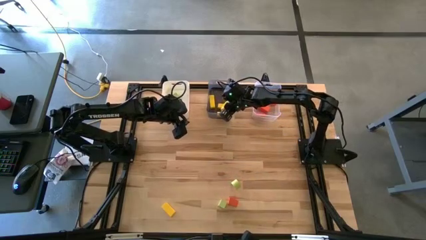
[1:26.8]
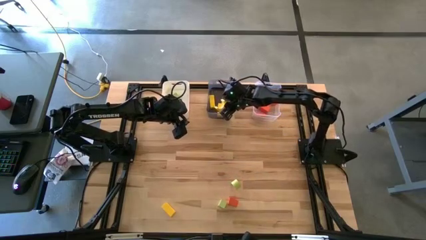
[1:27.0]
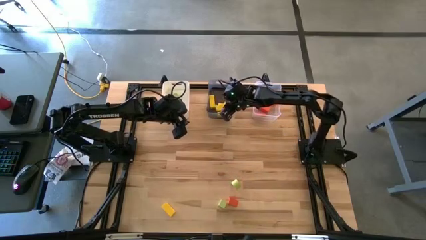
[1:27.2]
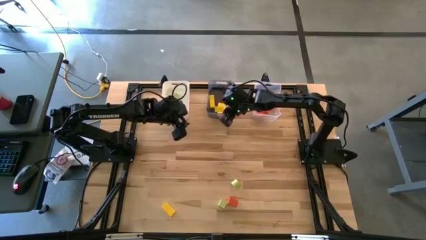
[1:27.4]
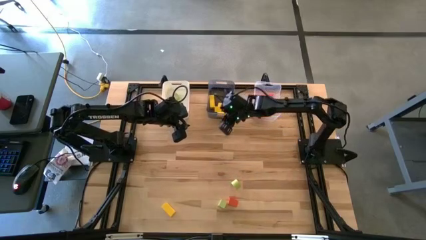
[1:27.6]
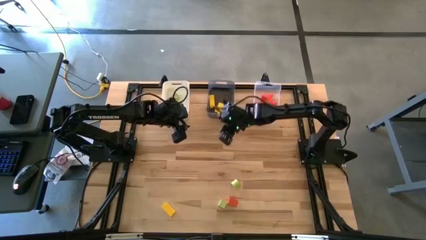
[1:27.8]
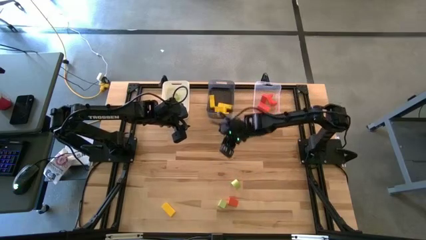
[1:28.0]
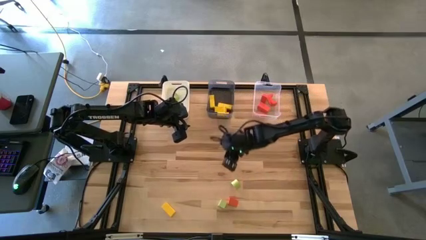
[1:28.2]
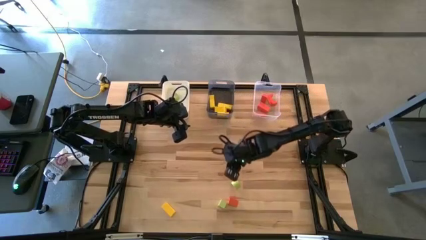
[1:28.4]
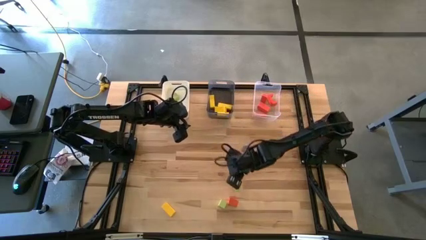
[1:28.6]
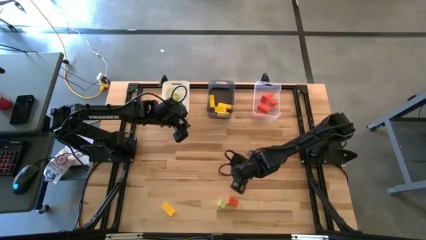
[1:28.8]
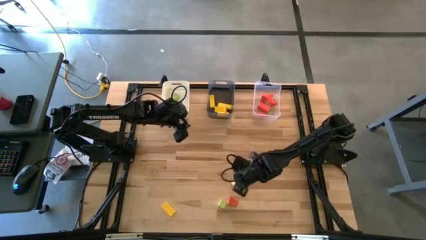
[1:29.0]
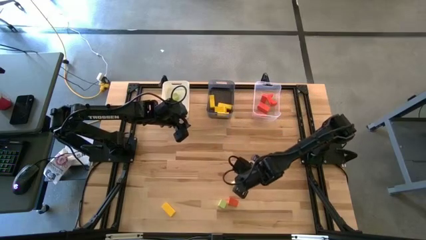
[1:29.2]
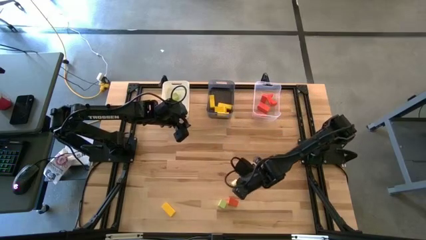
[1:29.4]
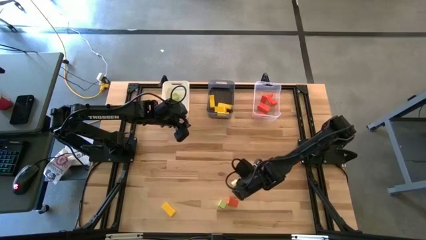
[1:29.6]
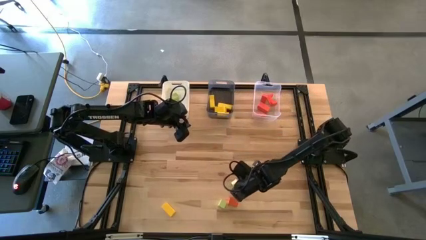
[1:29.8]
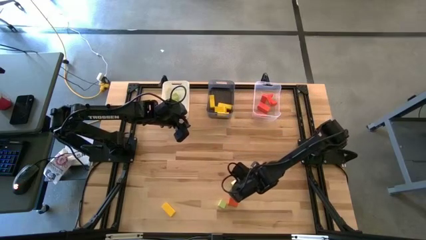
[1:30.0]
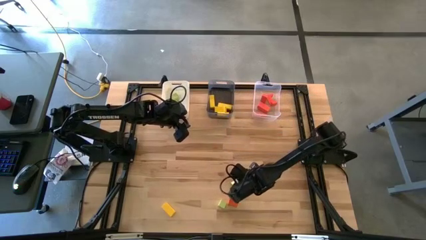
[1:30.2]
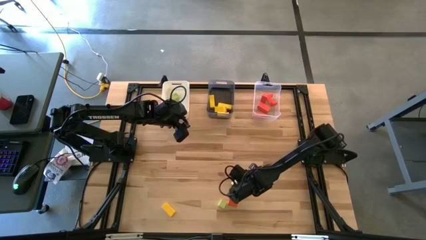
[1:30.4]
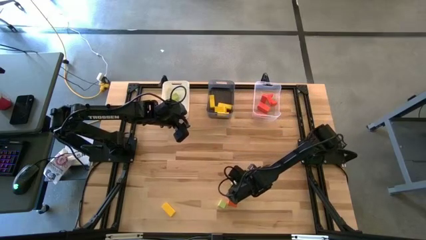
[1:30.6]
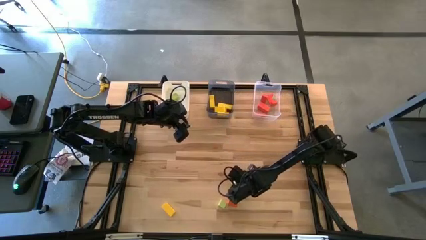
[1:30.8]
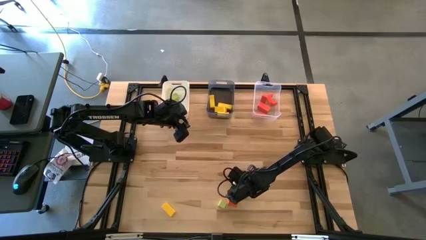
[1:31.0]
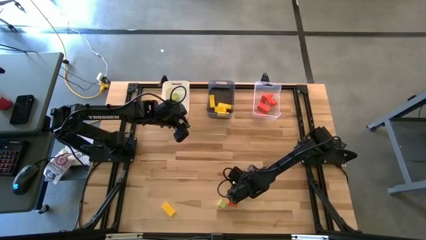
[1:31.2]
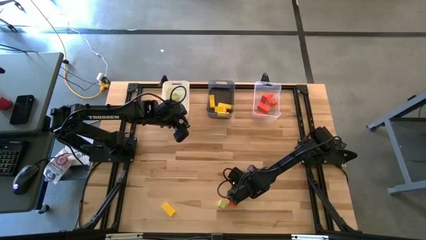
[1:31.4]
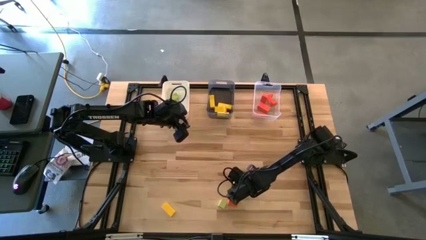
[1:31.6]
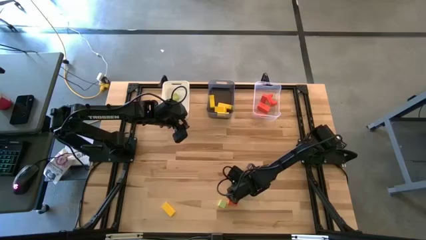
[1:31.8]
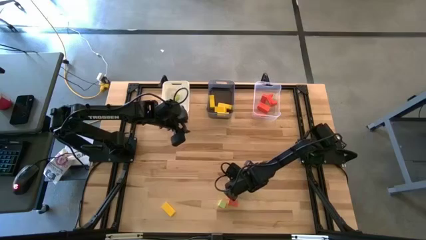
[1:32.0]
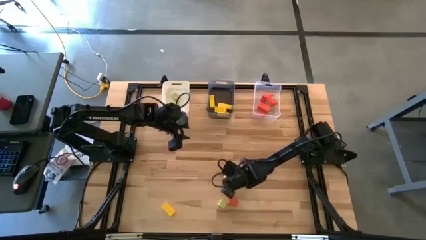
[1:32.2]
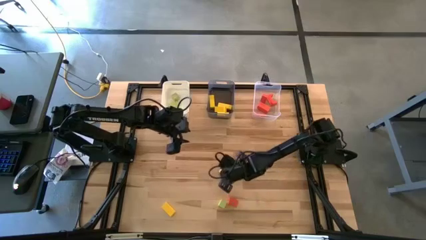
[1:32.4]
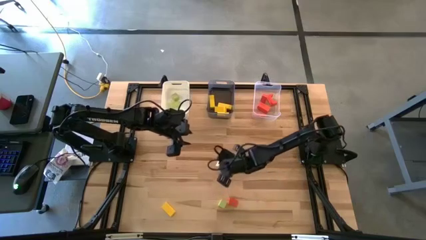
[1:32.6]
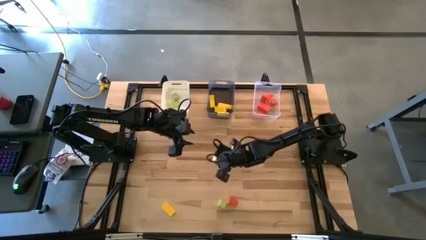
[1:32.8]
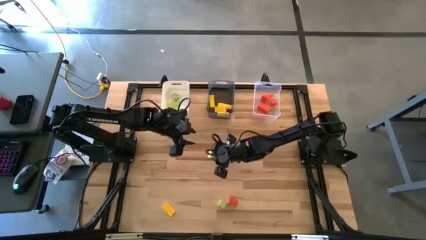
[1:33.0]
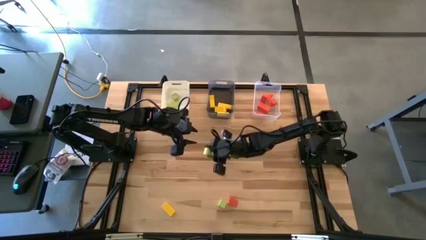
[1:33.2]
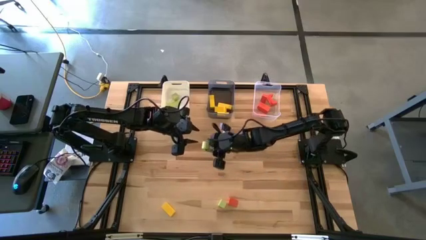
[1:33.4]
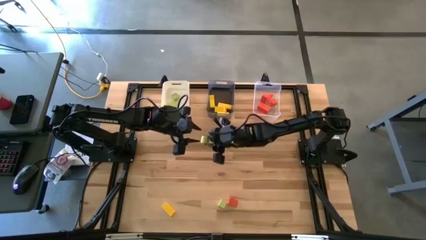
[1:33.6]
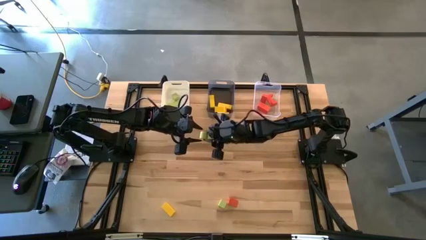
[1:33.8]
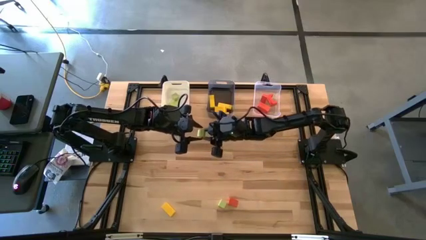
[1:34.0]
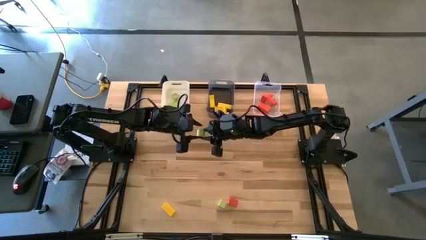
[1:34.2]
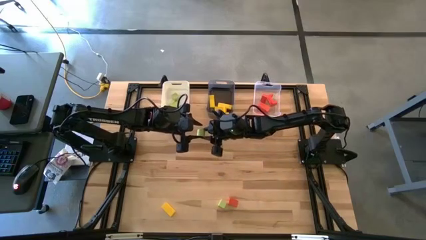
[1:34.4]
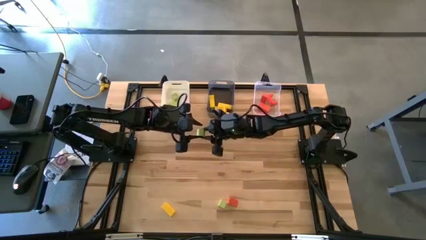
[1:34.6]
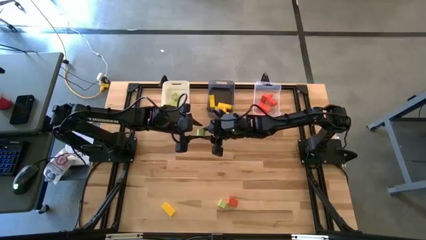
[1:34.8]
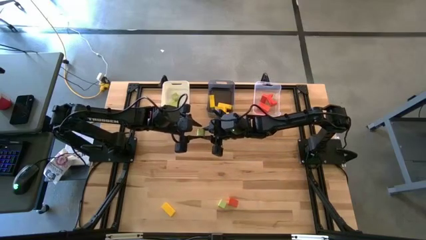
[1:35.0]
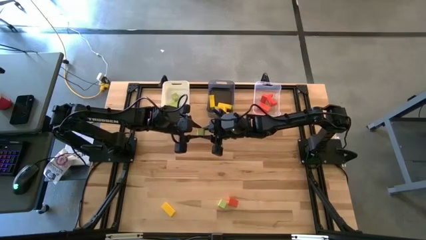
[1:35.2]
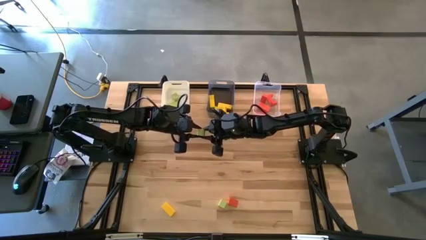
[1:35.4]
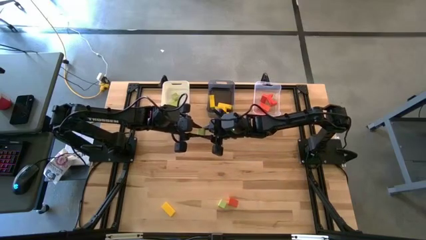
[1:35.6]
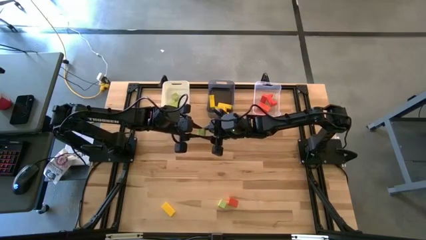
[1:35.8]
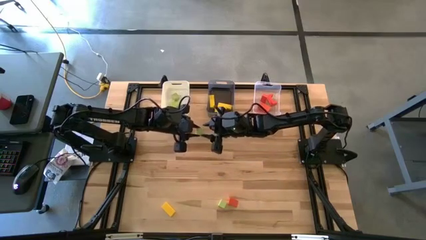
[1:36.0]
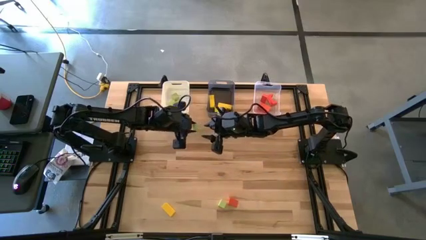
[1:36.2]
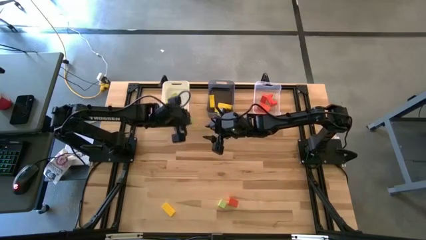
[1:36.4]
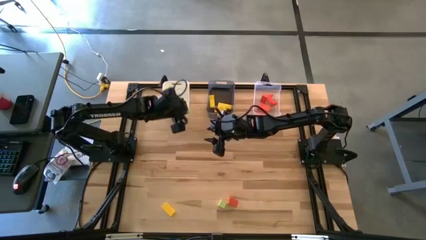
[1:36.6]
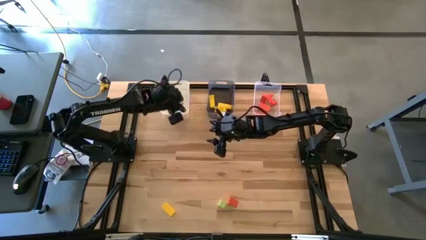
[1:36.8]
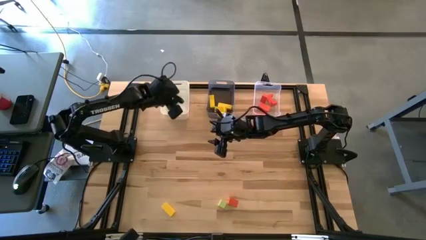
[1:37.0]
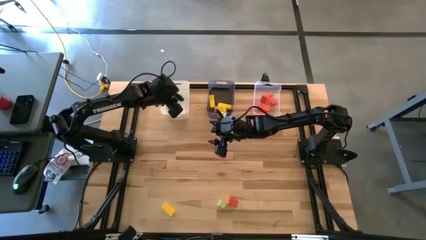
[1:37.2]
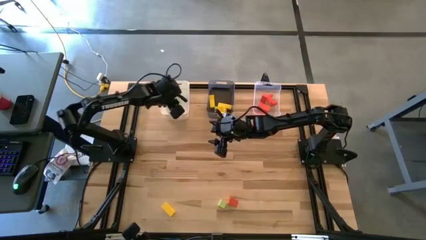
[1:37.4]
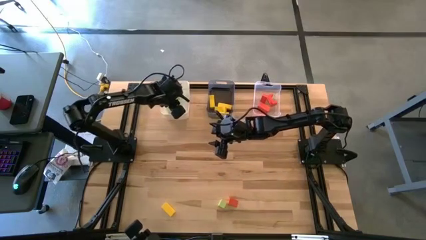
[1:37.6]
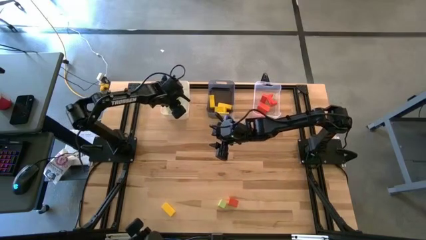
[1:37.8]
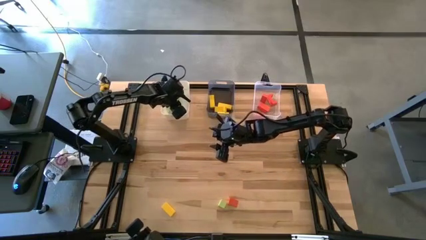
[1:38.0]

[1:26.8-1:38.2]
Task: Sort & place blocks by color
Put the green block into the white bin

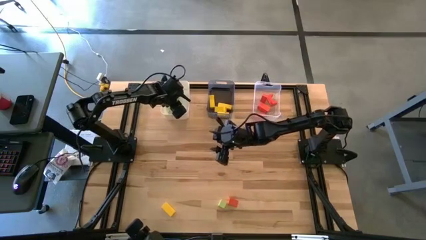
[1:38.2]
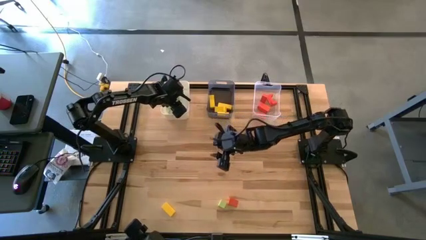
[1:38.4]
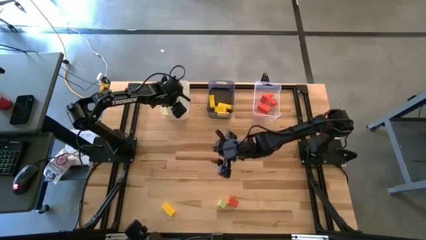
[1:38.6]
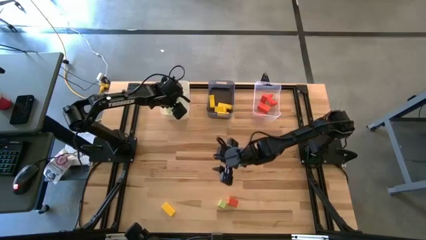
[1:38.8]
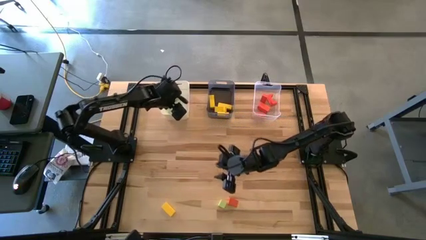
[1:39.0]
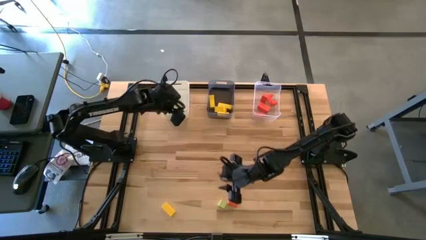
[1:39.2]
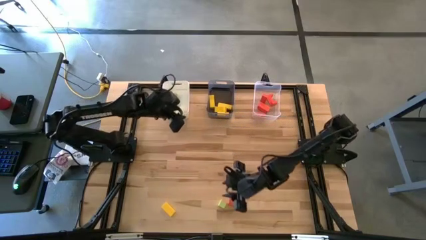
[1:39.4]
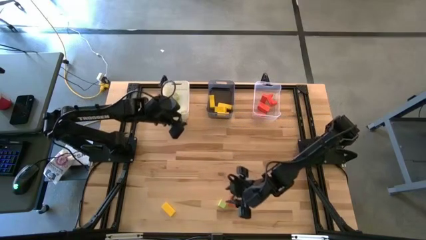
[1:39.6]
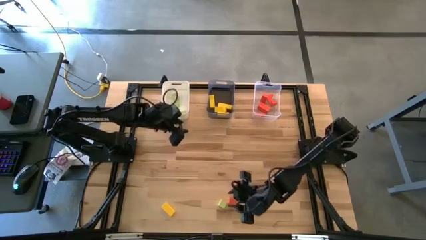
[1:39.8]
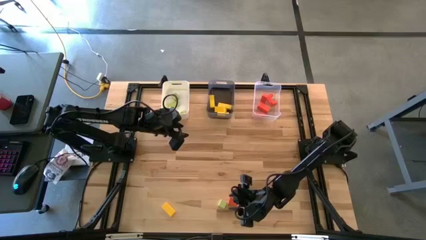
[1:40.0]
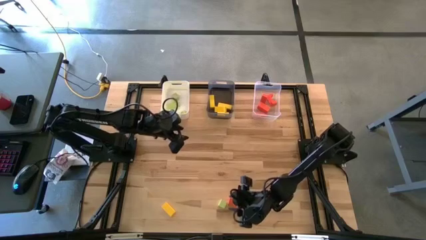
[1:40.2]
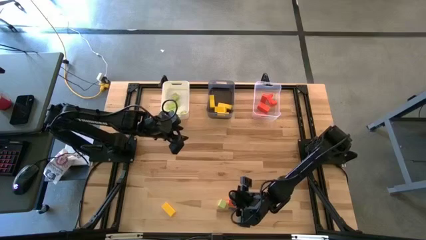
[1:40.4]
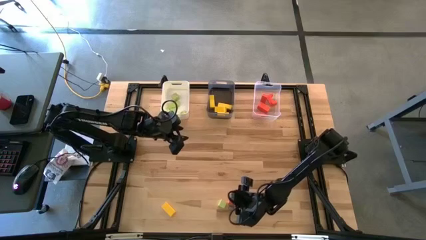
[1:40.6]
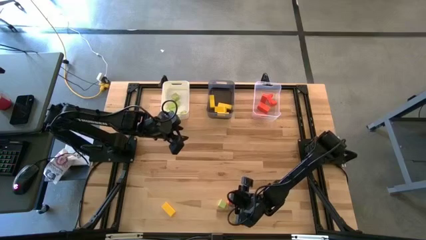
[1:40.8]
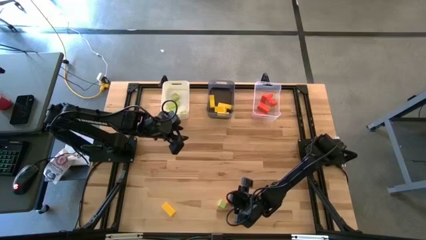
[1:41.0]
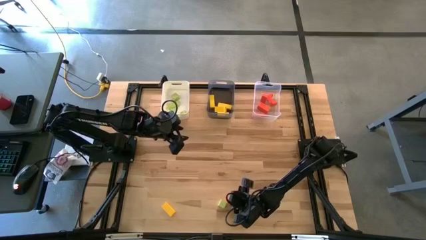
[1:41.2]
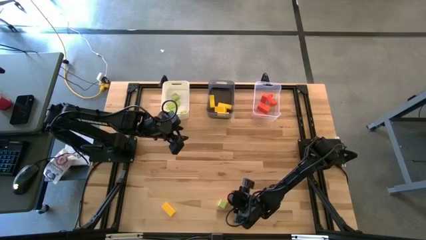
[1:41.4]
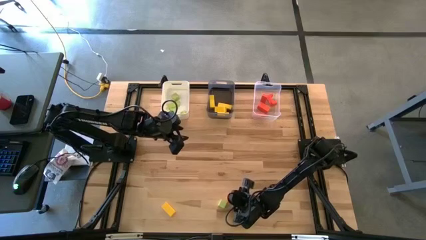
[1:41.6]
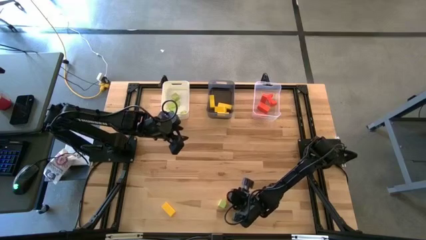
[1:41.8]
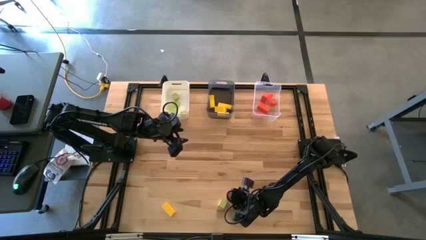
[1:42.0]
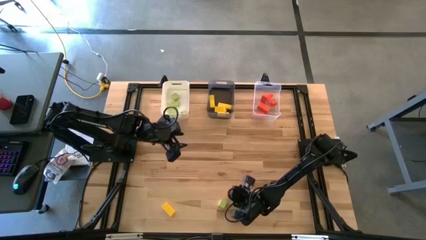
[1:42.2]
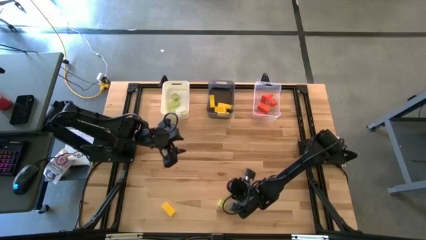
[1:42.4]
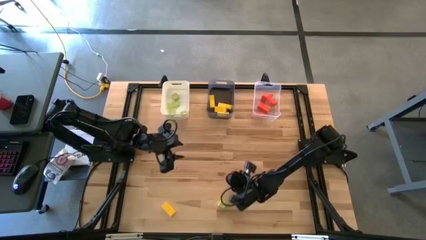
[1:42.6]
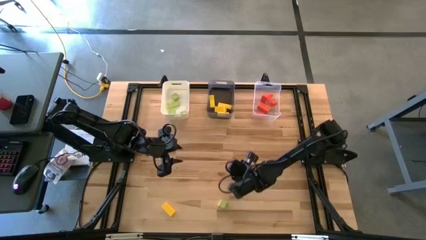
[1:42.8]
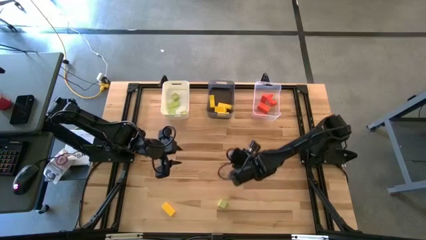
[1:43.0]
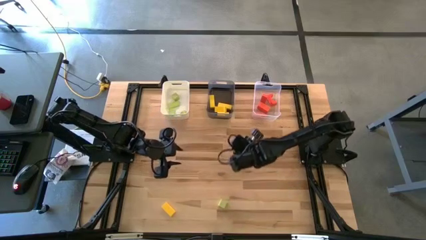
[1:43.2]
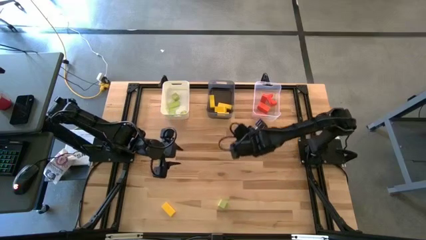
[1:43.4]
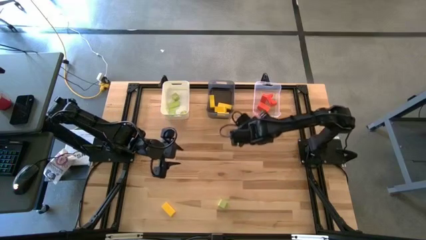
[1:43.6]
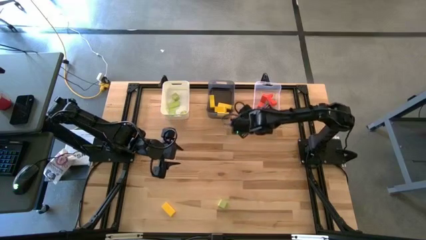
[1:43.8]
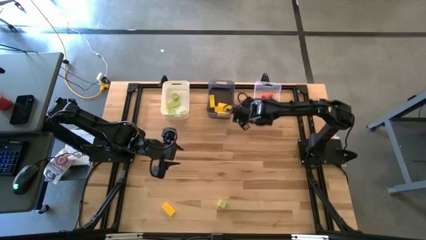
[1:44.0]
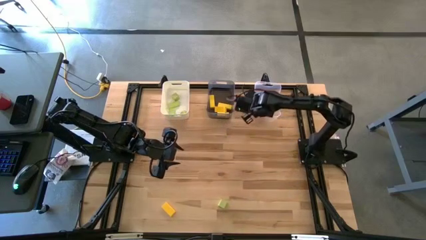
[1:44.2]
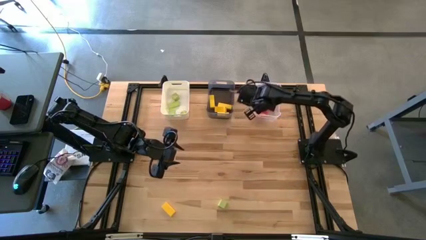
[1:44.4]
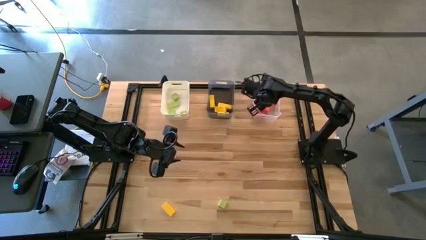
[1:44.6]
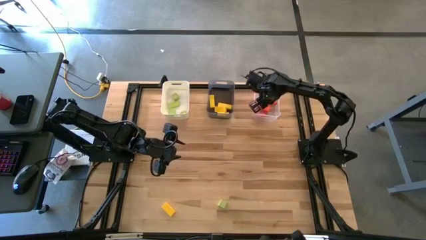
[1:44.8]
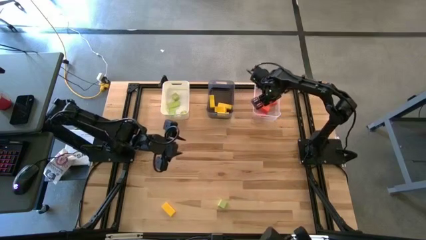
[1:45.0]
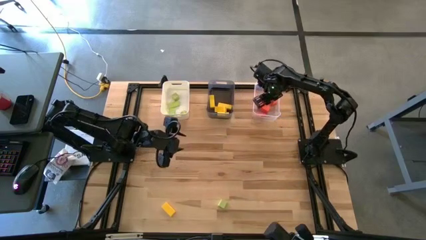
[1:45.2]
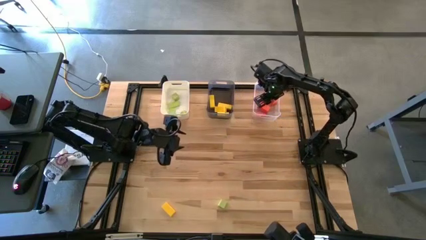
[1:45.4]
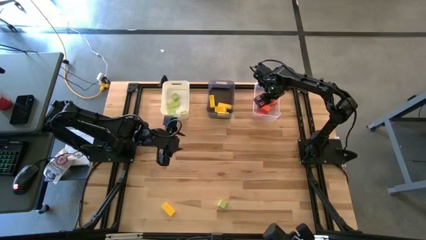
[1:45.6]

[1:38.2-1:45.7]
Put the orange block into the transparent bin
